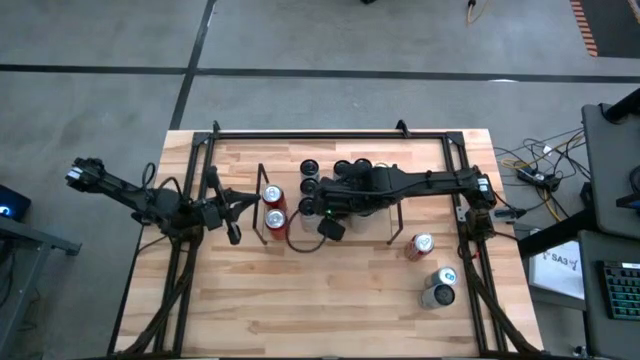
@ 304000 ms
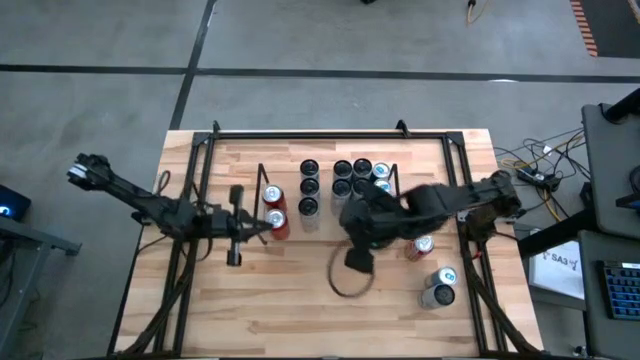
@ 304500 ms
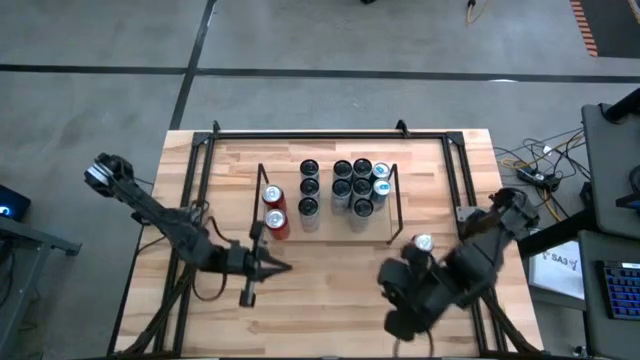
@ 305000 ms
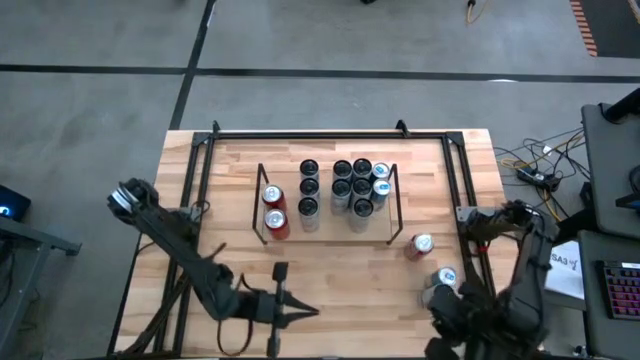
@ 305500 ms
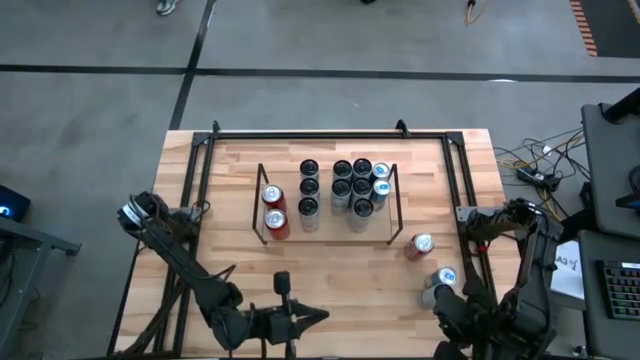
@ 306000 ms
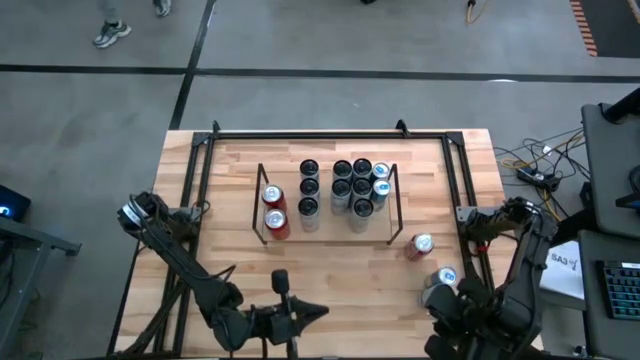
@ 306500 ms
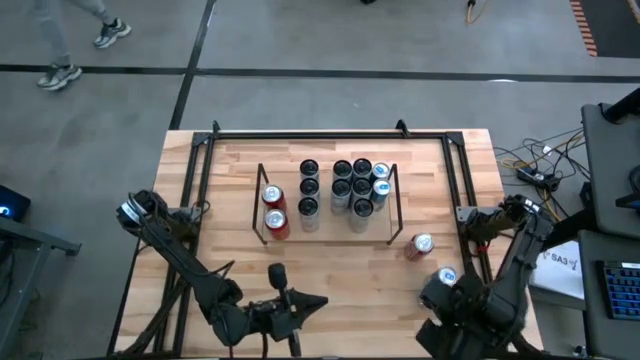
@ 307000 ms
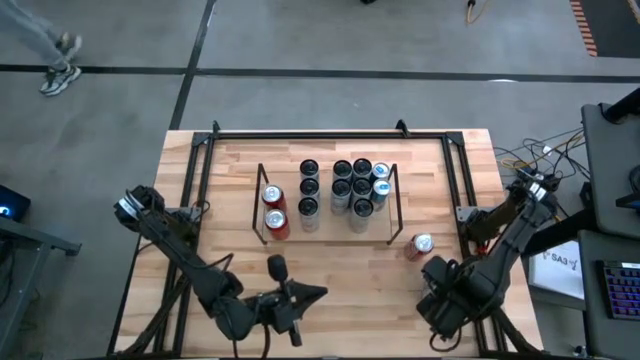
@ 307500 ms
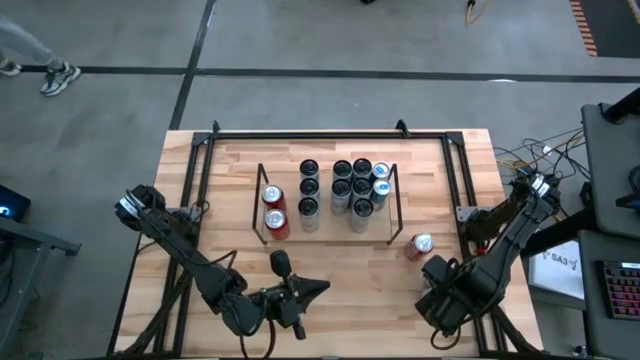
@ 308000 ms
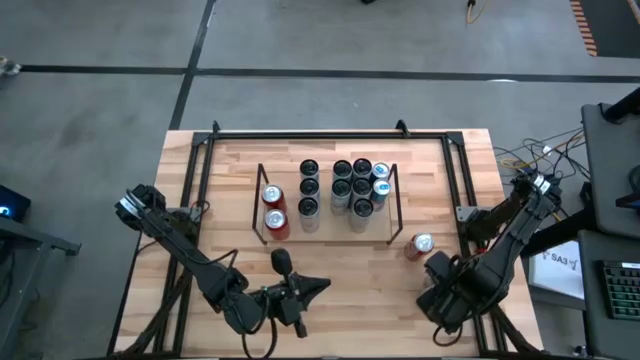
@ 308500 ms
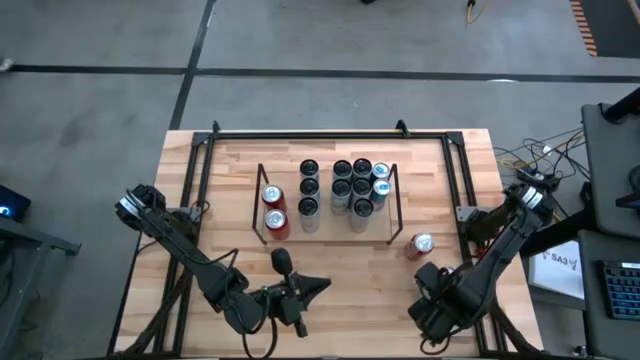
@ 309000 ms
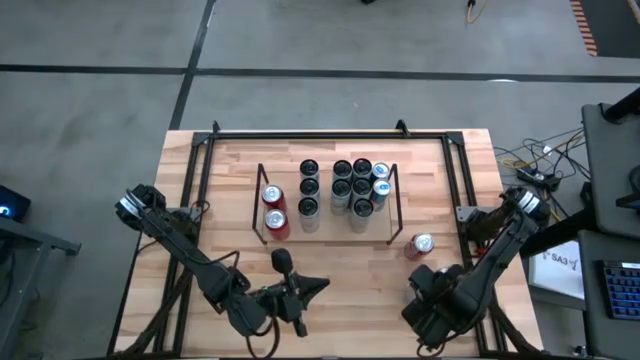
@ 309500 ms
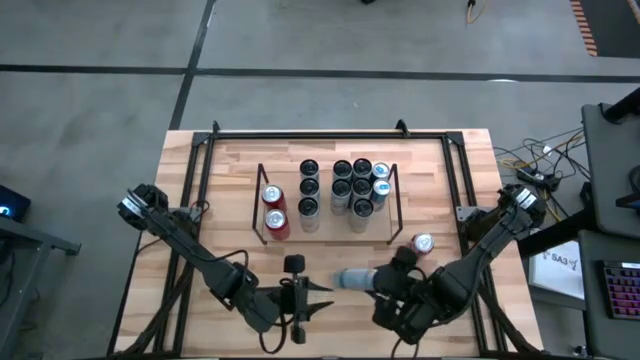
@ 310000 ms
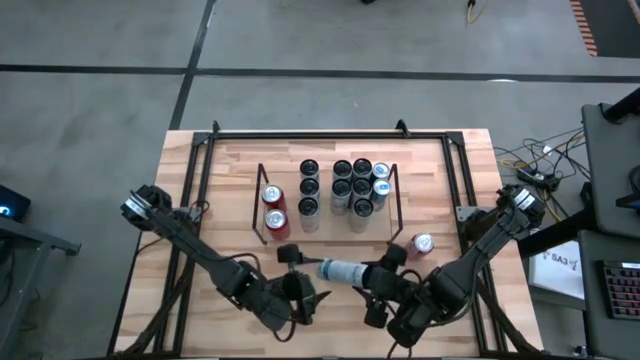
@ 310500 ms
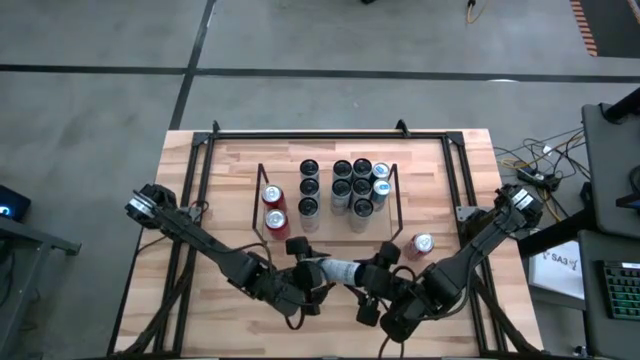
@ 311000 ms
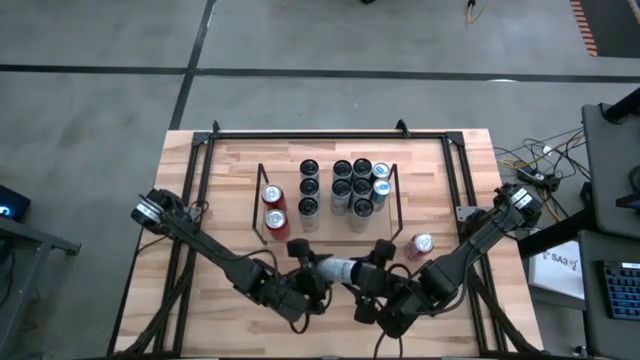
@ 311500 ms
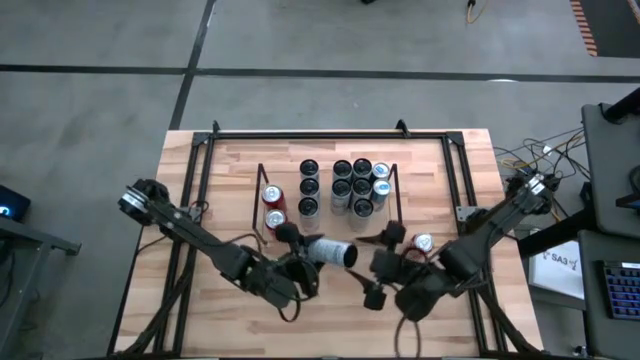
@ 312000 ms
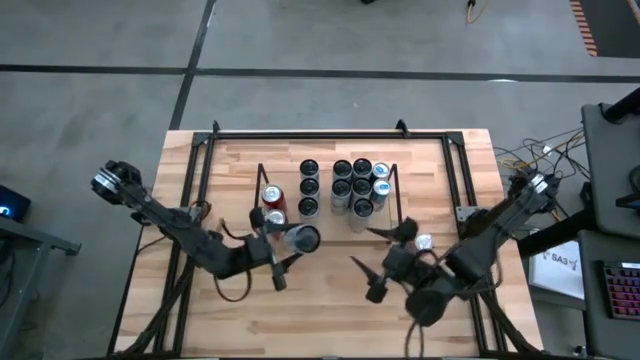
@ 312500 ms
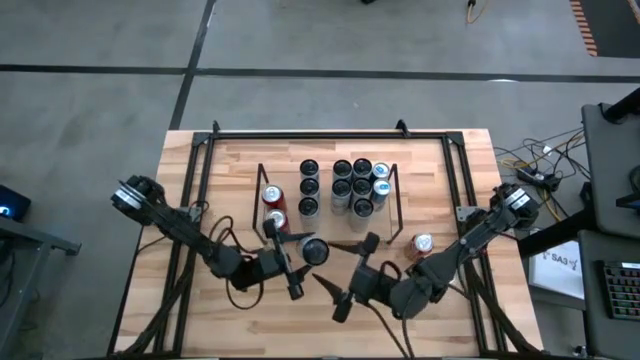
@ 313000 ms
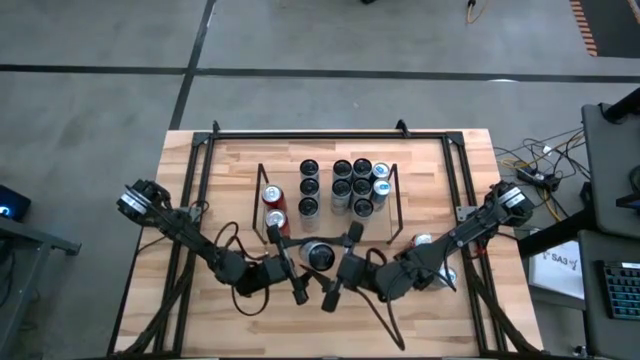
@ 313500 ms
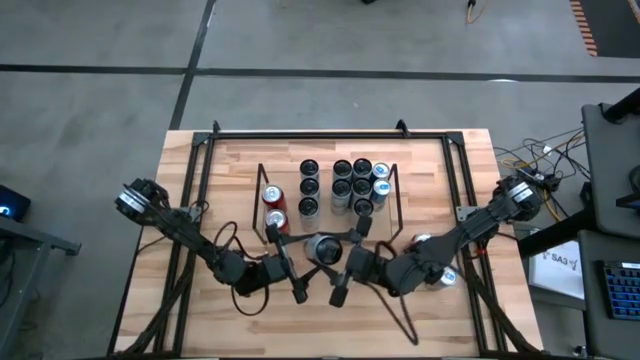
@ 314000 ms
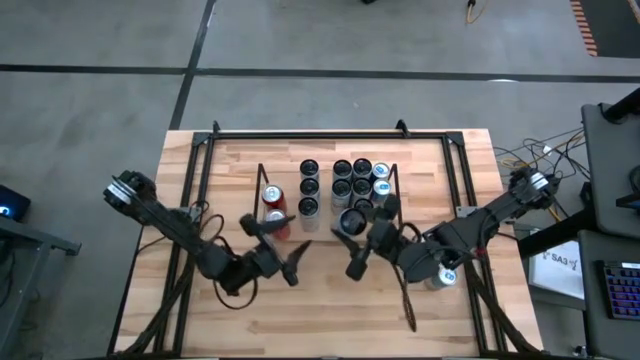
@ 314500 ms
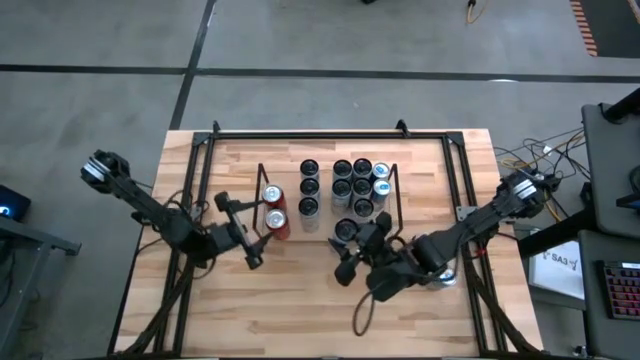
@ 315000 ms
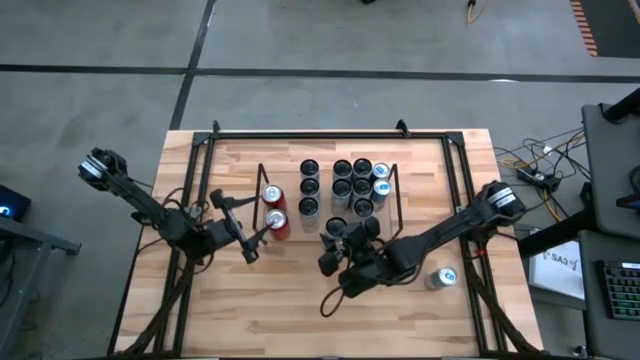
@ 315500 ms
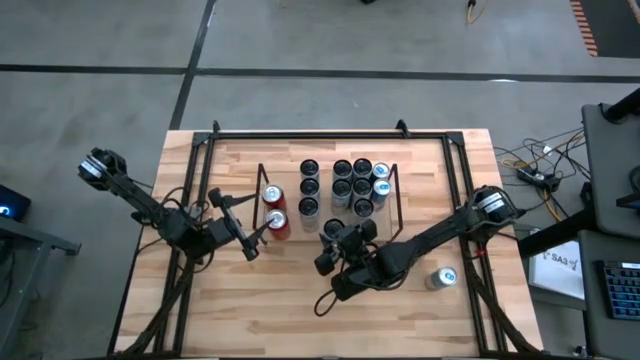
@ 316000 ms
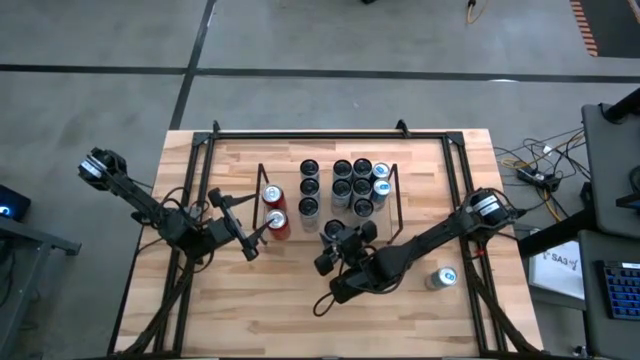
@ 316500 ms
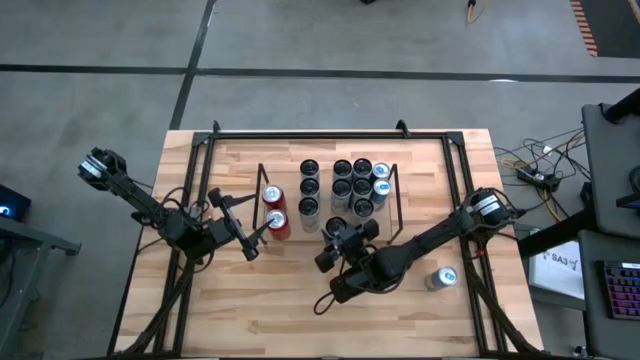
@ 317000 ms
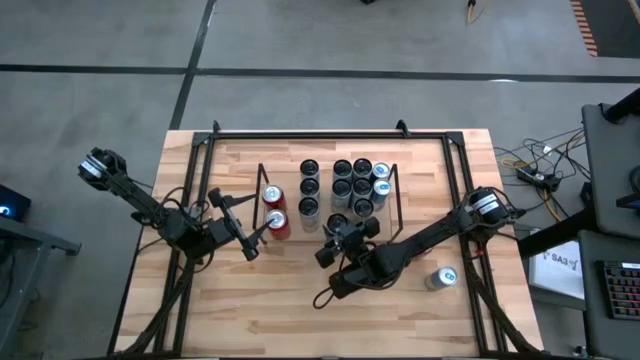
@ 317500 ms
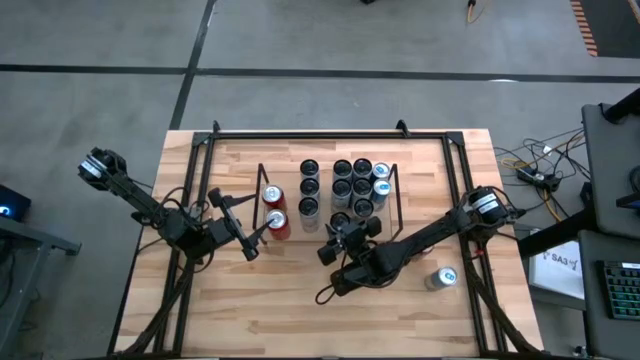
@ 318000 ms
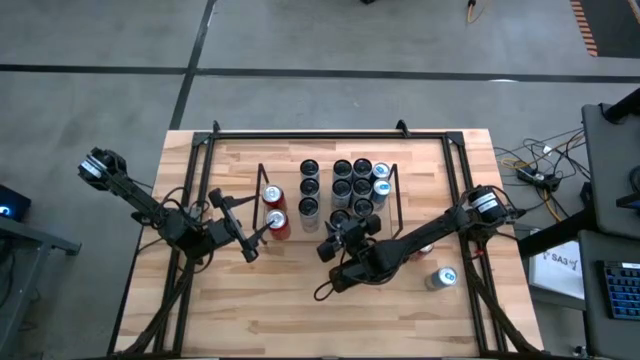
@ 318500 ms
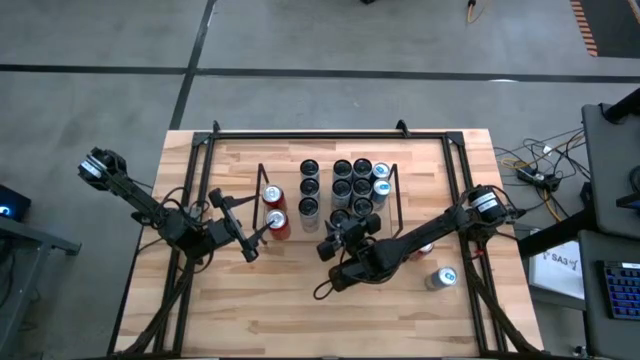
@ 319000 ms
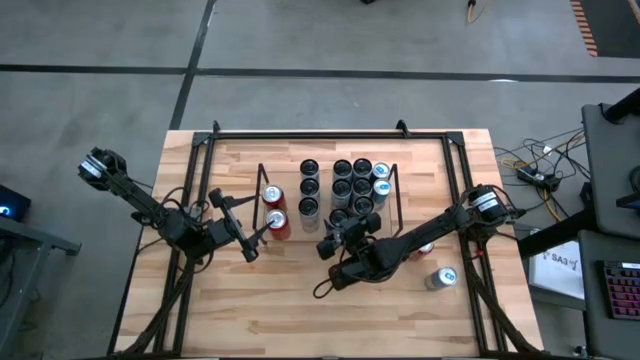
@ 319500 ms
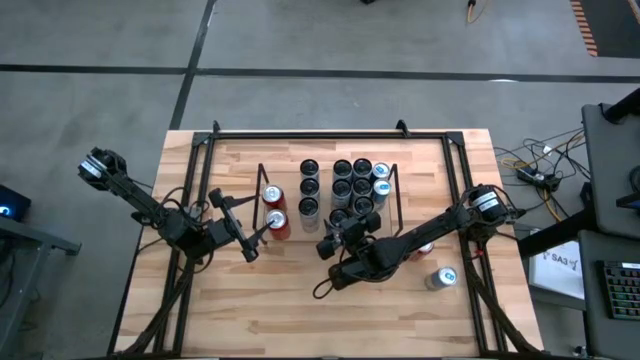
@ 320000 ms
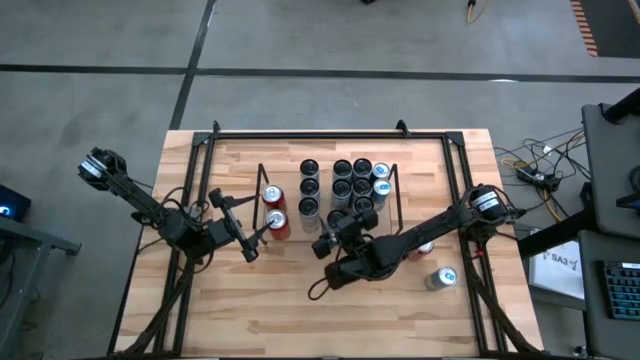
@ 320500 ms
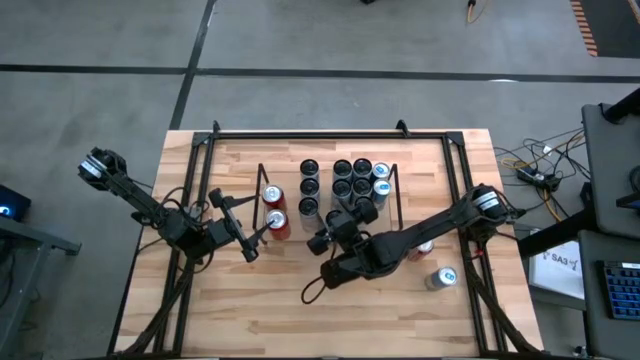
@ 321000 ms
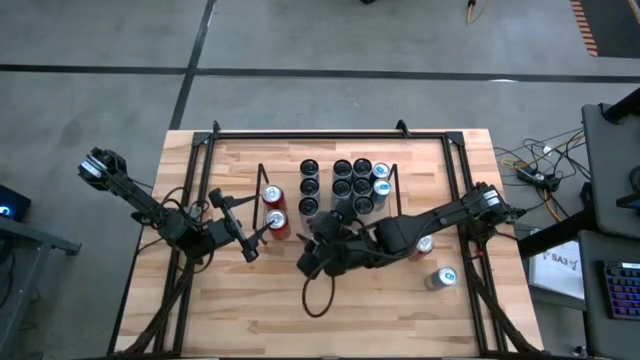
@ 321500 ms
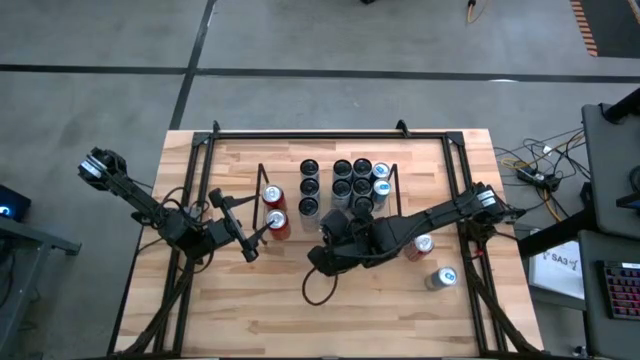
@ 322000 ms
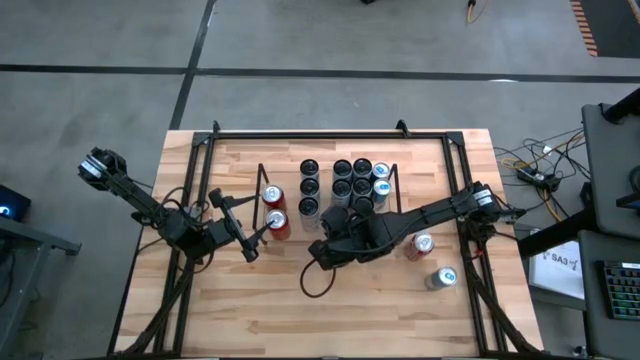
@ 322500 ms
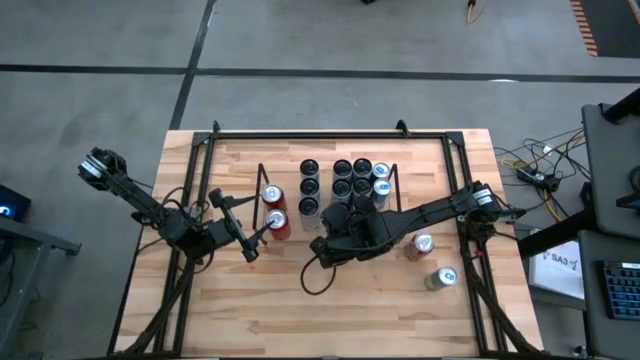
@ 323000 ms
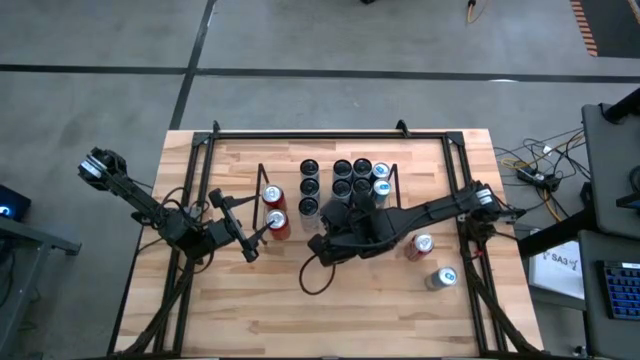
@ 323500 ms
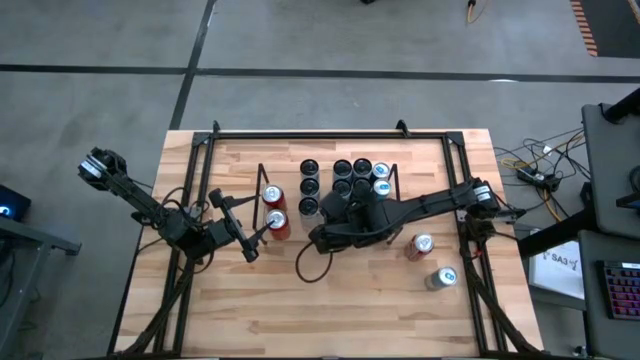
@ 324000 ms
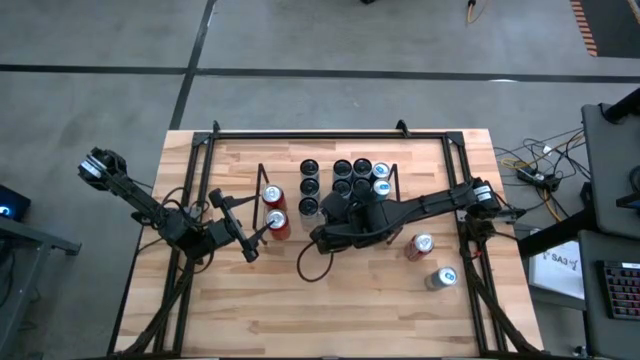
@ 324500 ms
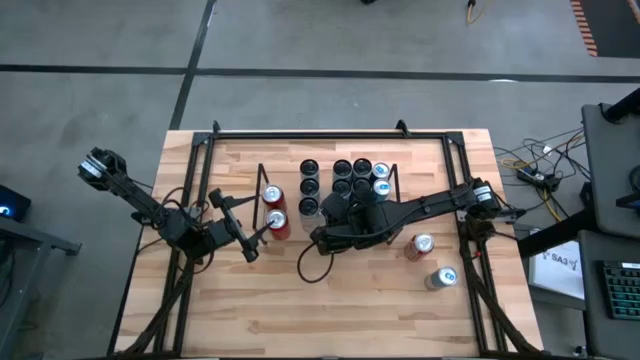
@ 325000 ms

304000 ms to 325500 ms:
Task: Place canned beverage on shelf
Put the white and blue soda can on the shelf aligned with the other white and blue soda can
